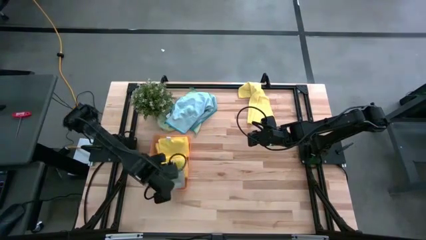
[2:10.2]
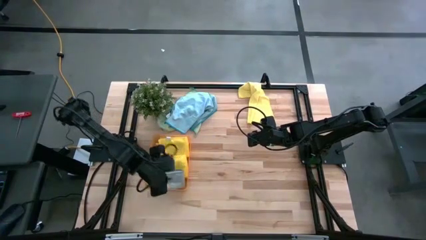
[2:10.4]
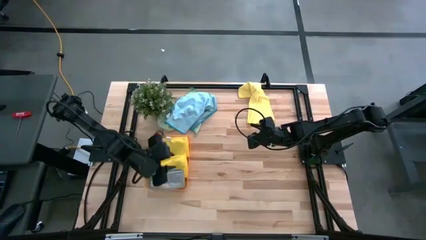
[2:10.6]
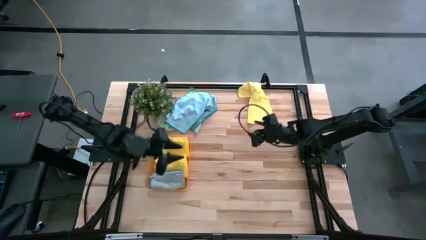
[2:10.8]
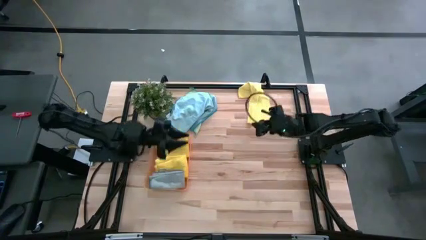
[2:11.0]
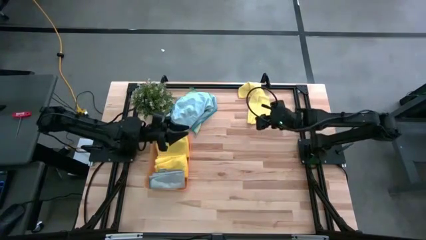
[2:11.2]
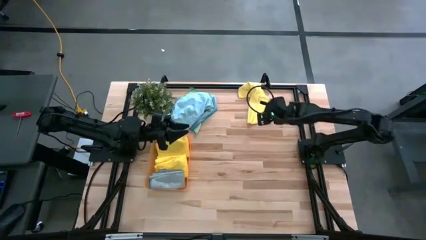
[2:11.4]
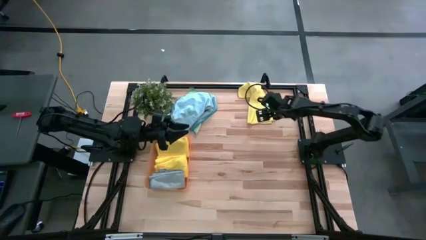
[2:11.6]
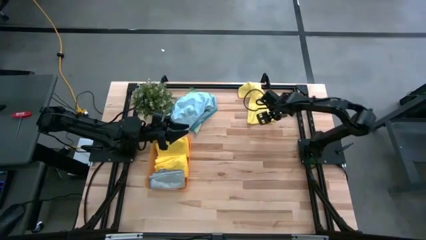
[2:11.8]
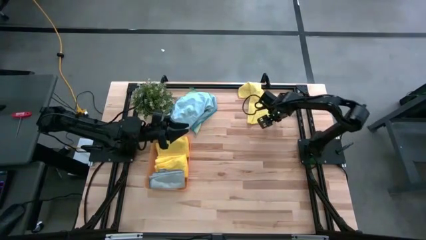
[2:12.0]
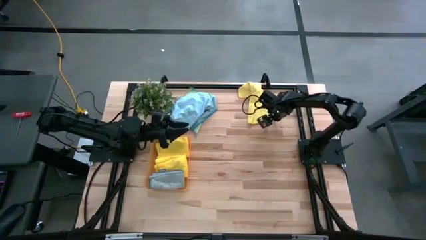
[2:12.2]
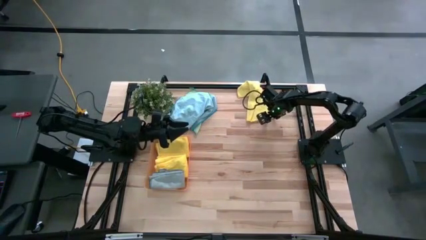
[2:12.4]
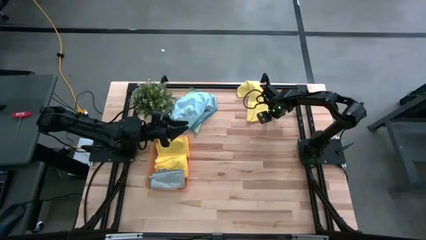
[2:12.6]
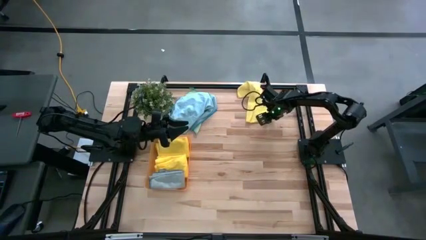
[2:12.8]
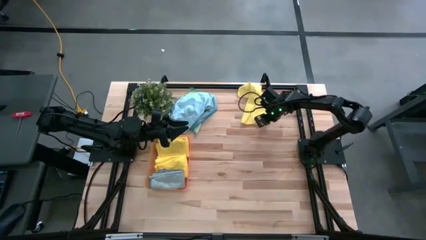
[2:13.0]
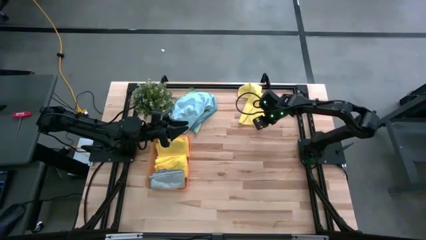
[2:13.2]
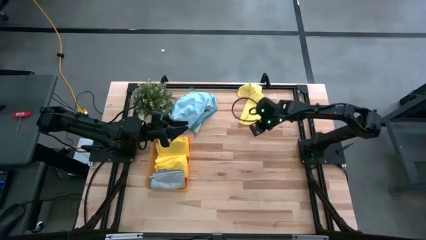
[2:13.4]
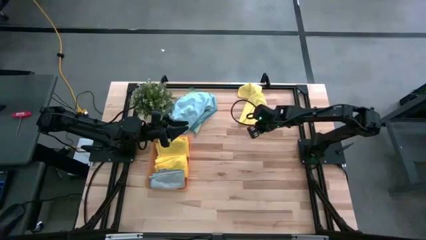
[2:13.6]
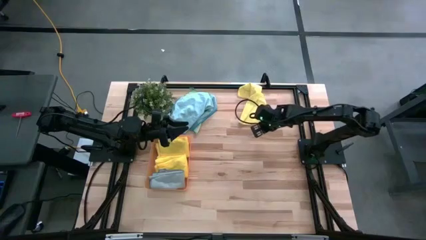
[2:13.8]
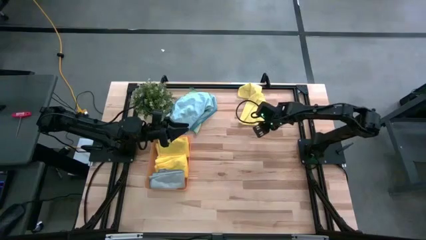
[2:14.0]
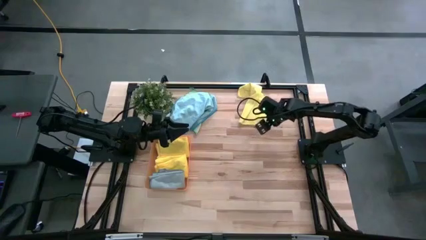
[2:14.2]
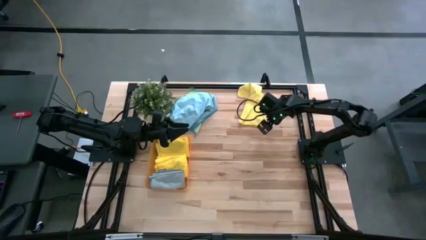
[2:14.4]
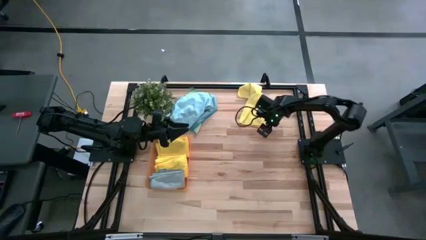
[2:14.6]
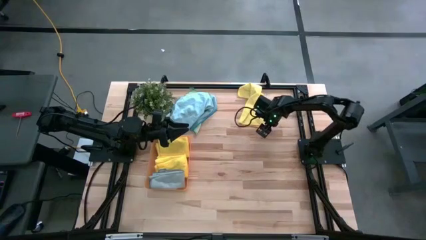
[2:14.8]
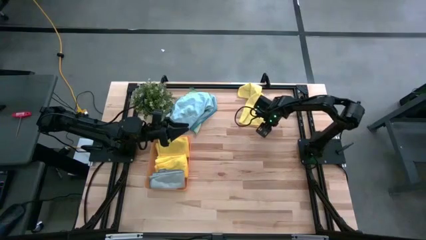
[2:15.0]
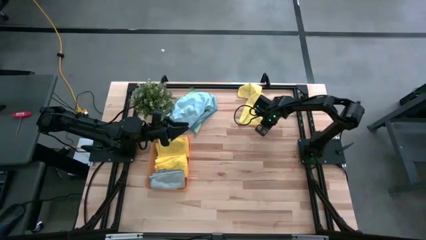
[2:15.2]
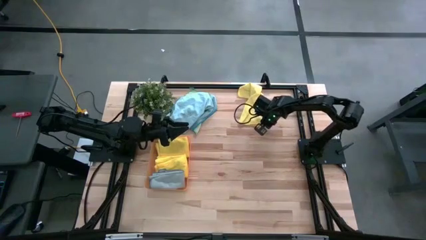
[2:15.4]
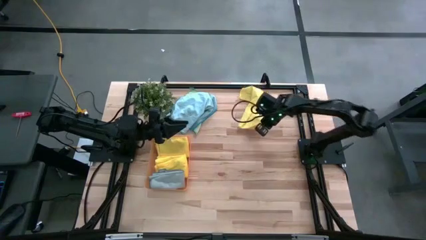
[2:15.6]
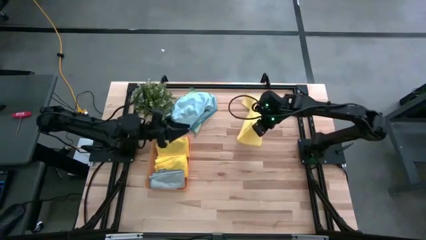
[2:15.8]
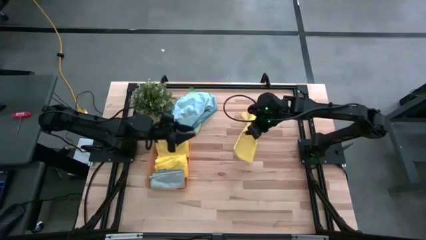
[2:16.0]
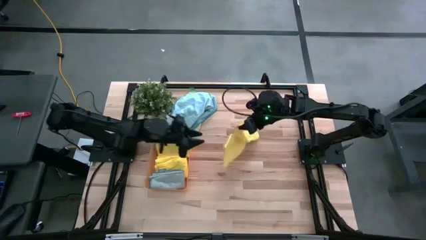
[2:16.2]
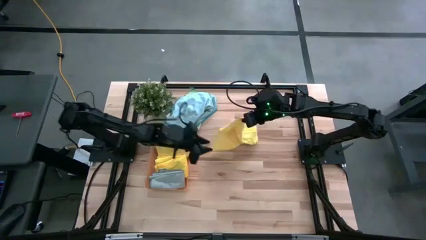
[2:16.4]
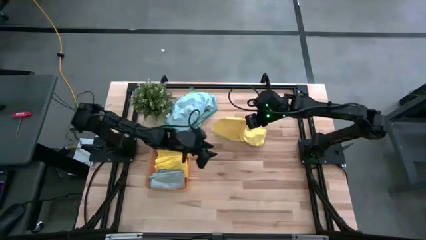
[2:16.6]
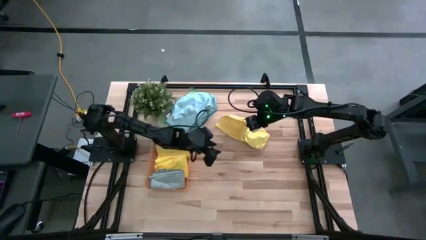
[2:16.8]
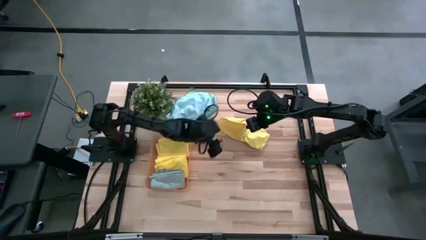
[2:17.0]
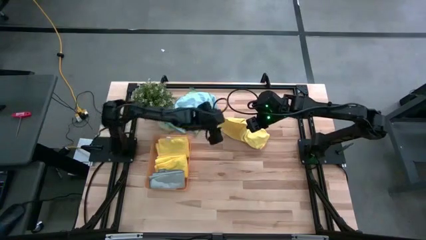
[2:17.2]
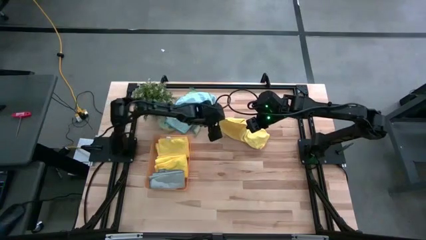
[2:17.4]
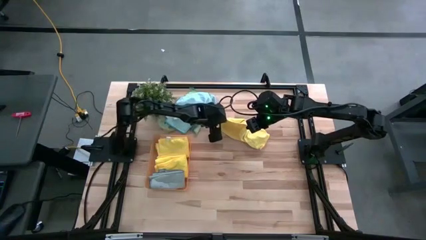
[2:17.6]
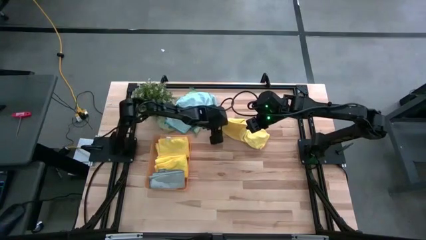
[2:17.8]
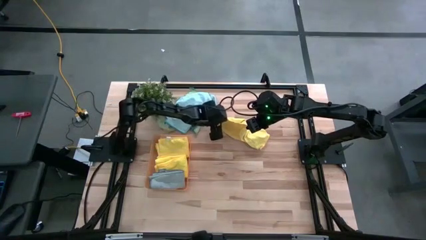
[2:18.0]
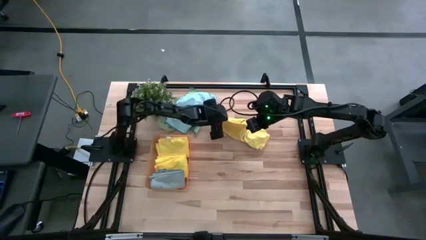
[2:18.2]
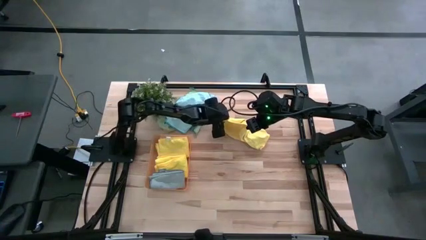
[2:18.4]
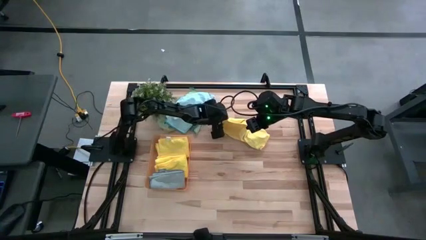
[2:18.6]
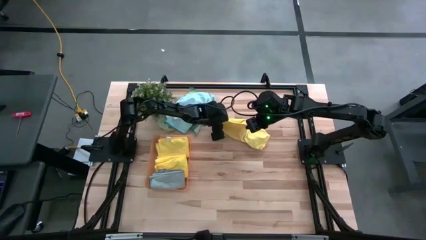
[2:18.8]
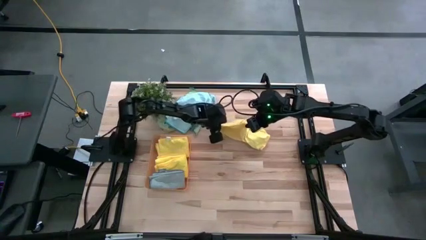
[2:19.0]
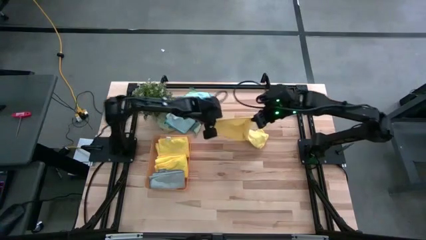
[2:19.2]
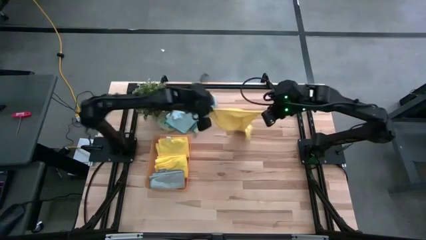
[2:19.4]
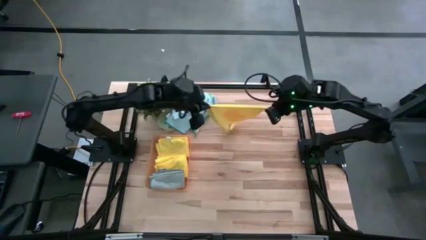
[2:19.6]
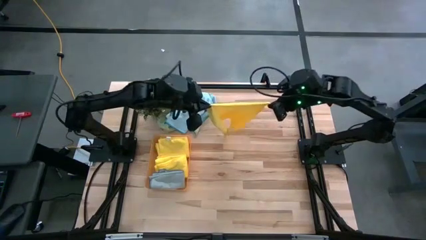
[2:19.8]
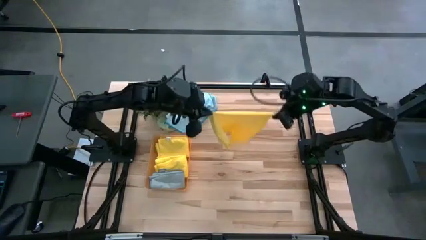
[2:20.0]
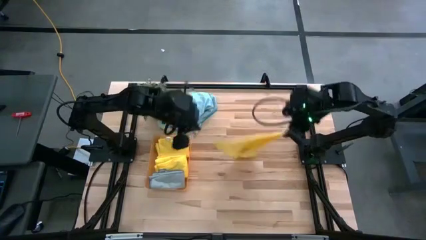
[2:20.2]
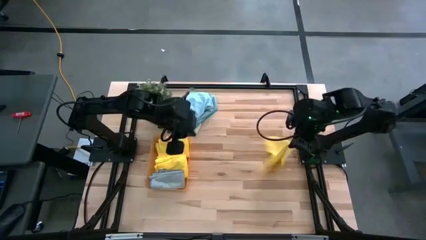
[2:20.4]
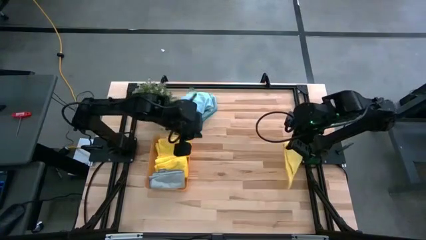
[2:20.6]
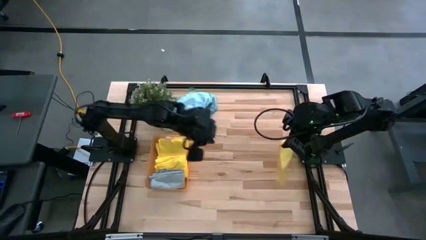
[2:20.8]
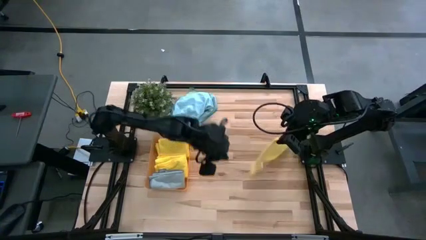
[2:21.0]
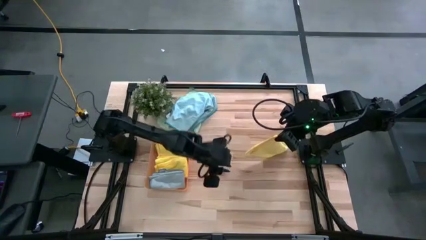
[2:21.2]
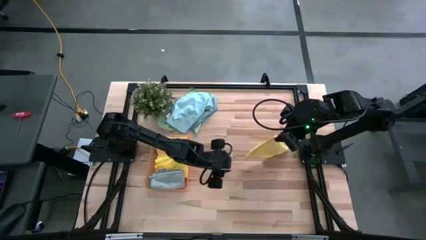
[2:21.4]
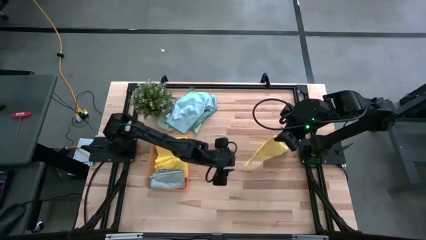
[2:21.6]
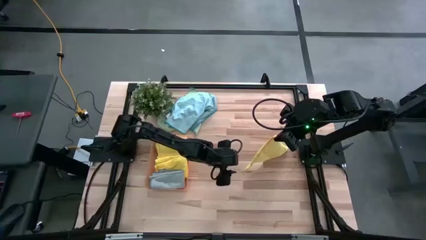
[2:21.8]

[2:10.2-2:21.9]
Task: Fold microfiber towels
Fold the yellow microfiber towel
